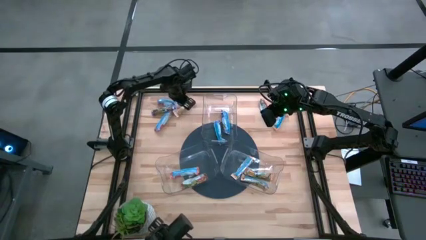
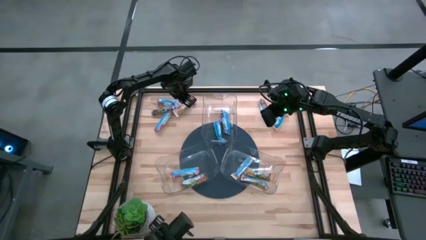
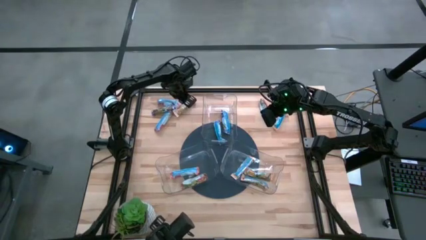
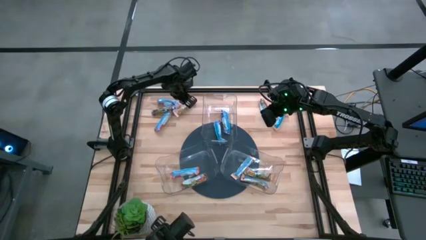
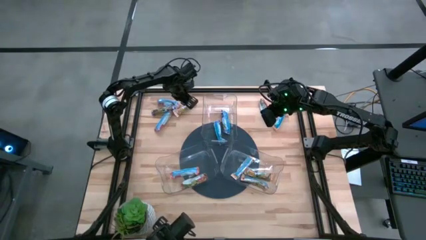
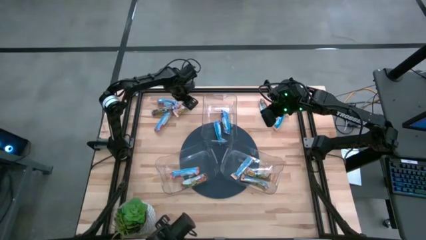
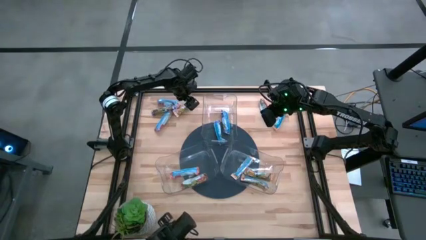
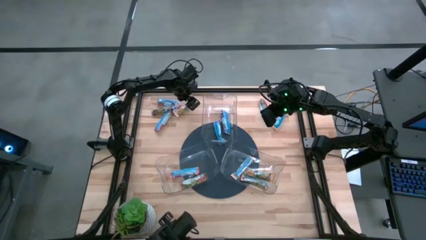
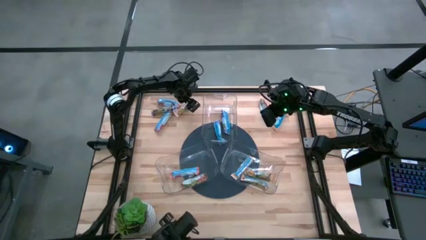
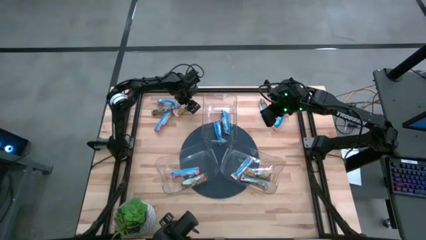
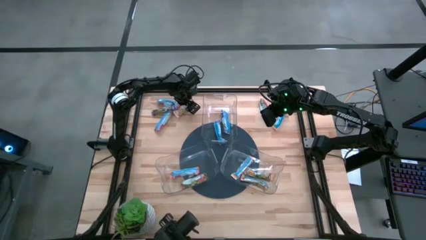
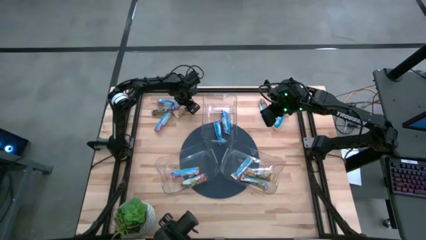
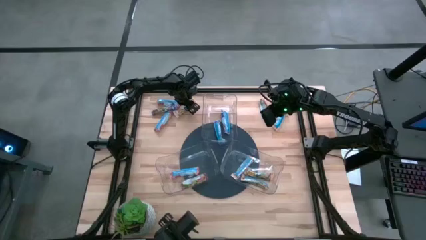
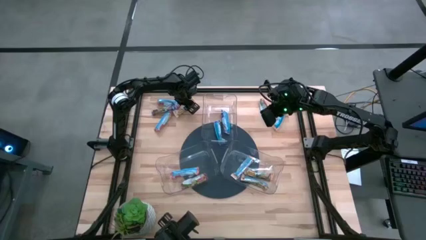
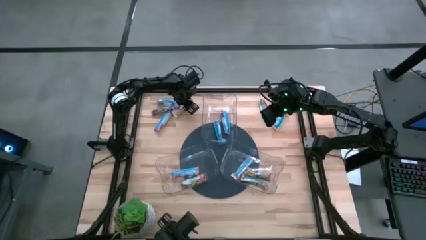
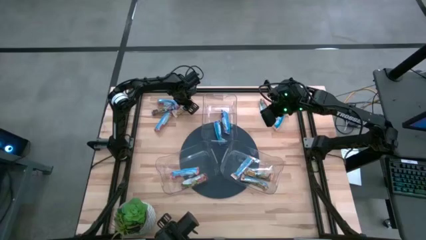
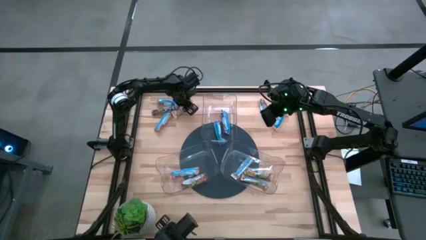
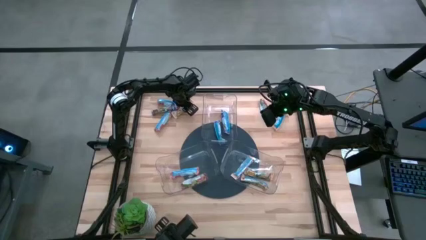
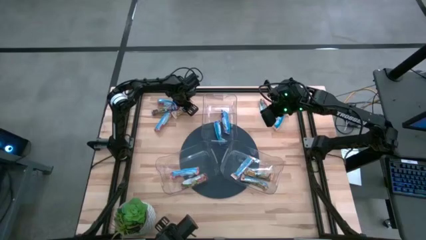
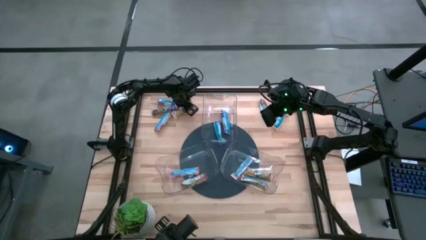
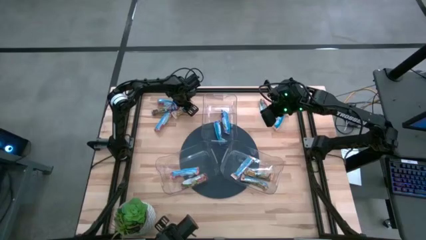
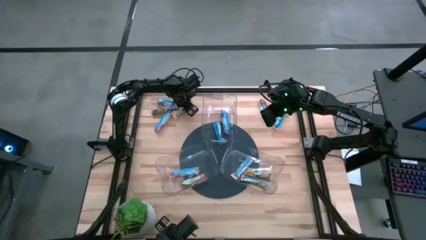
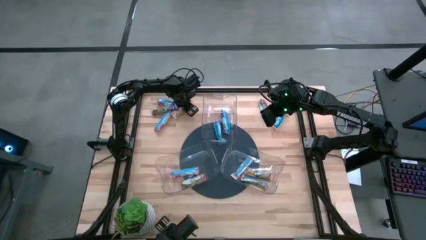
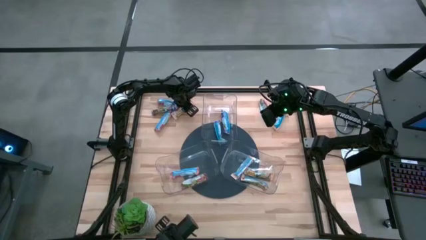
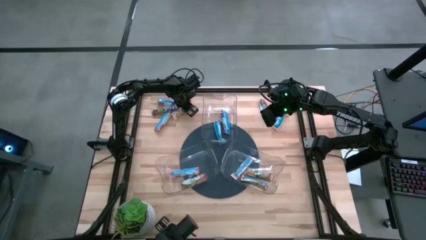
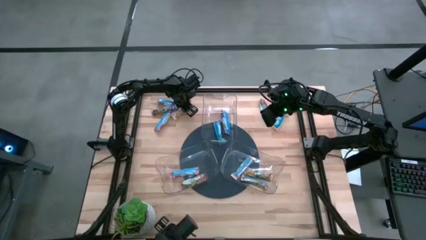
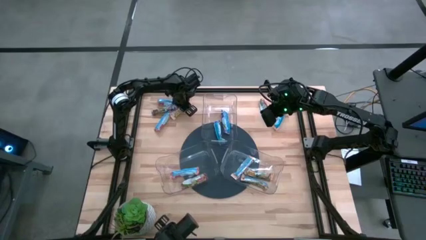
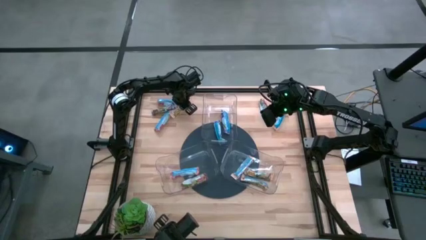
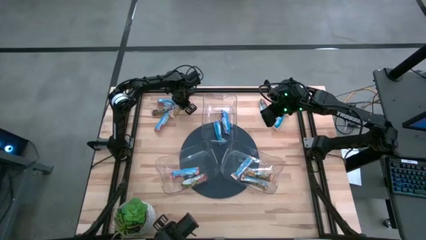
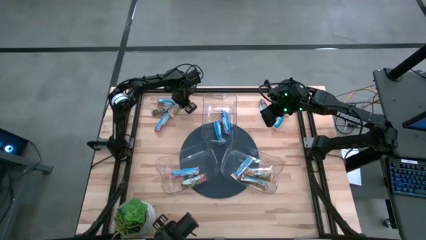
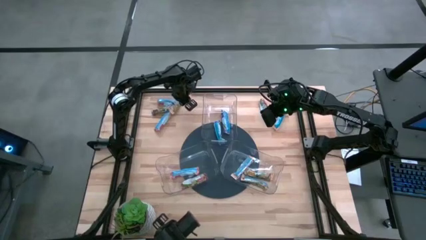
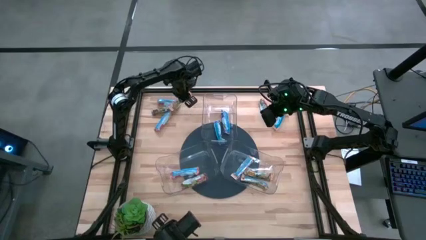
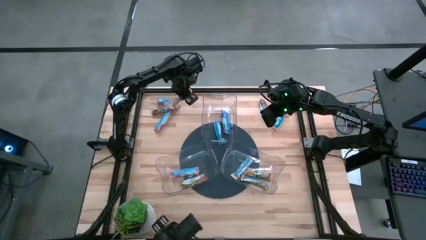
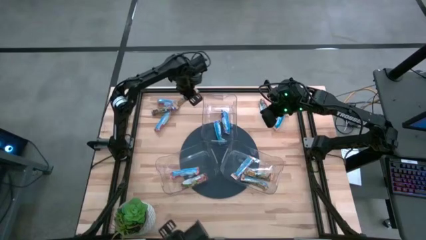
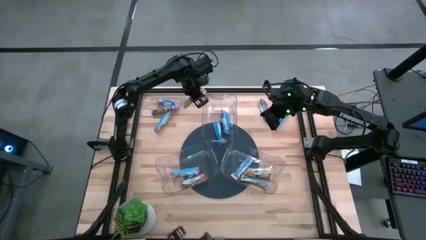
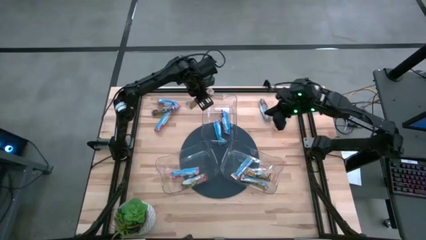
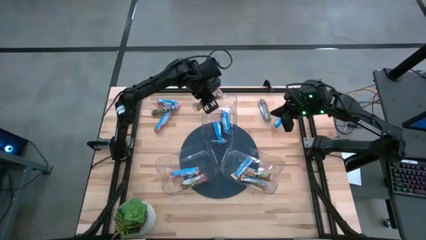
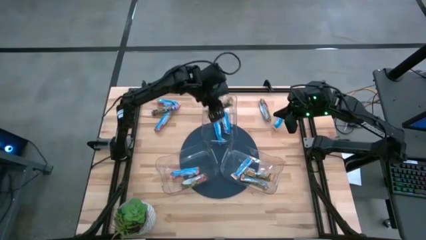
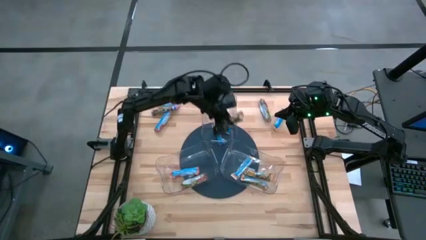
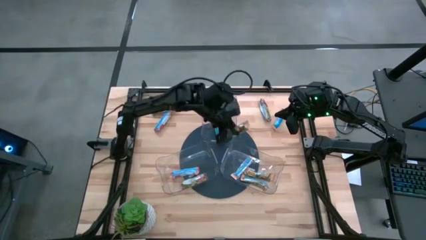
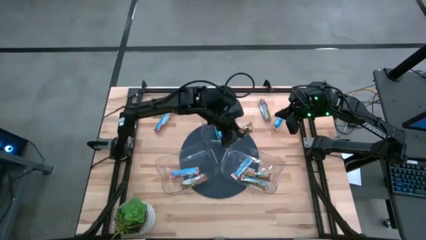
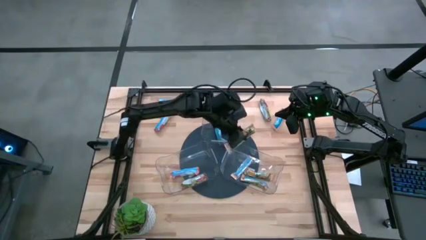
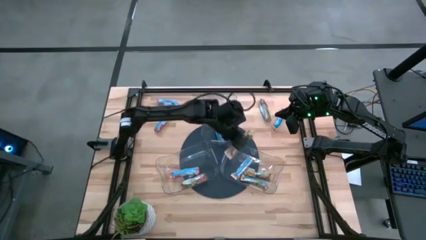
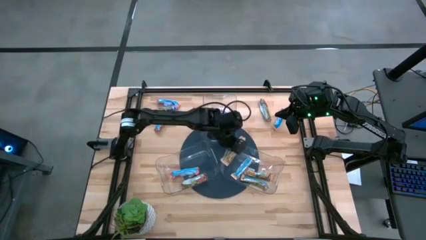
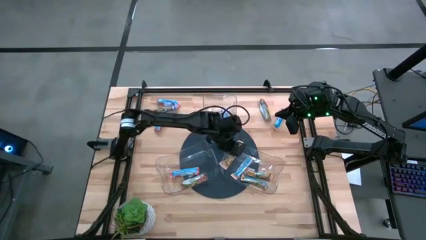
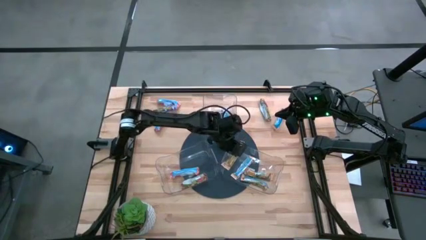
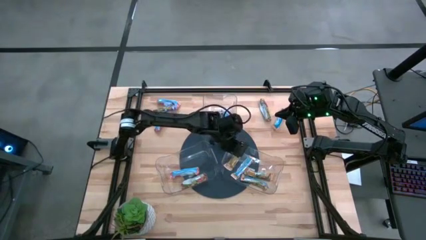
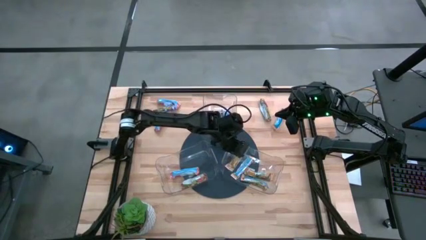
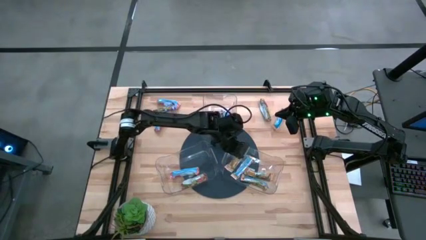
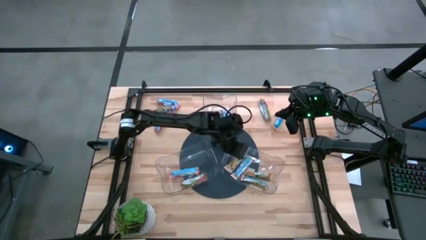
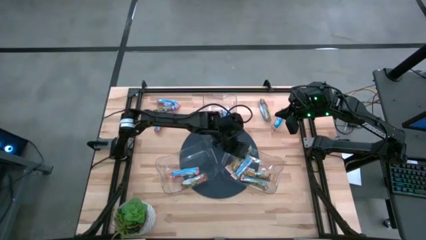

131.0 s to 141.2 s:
Task: Pick and place Granola Bars by type
Put the yellow granola bar into the right transparent bin

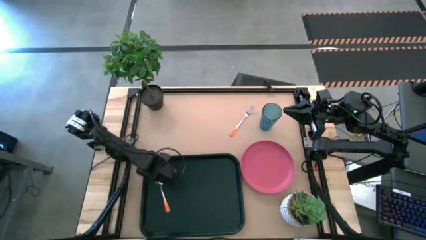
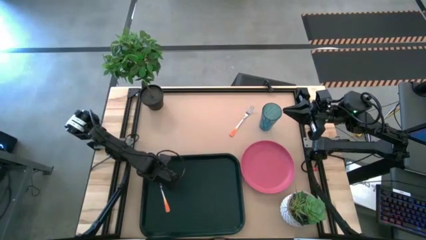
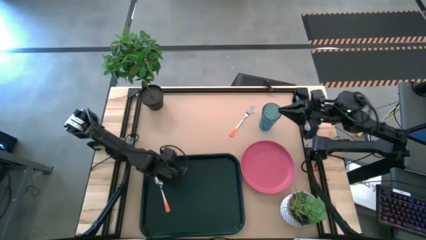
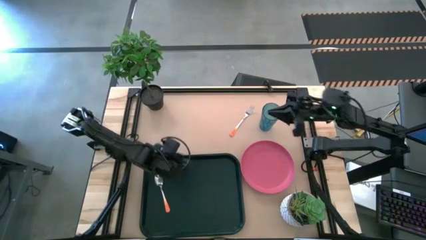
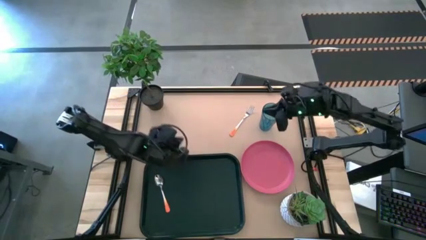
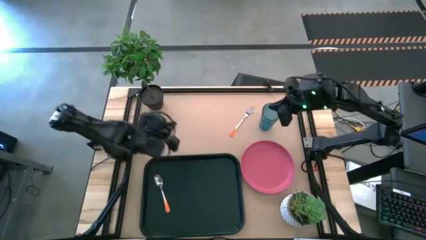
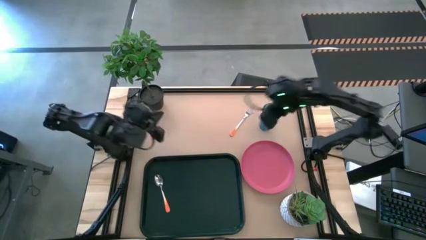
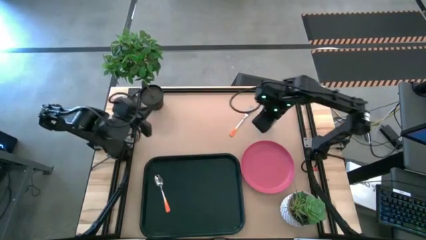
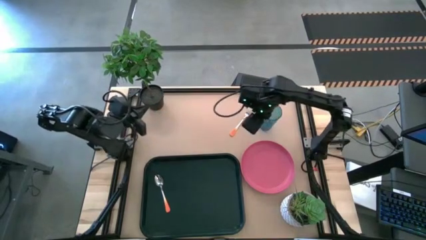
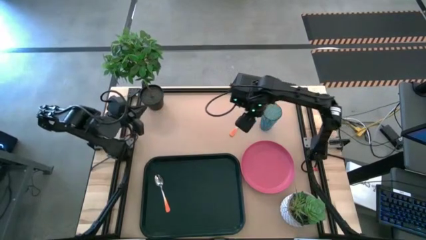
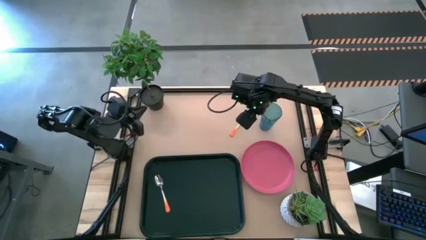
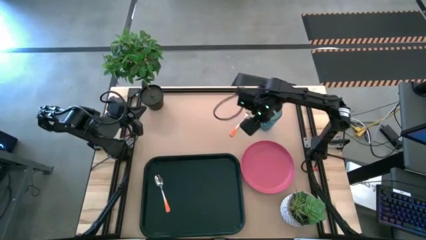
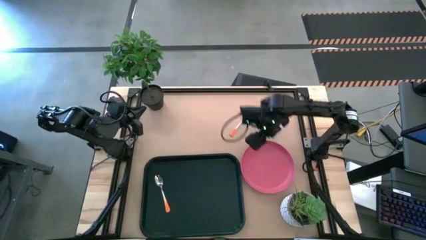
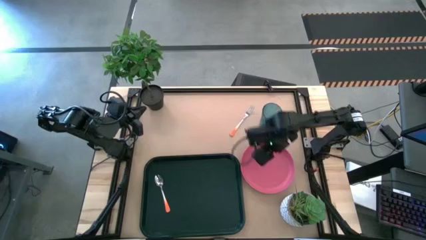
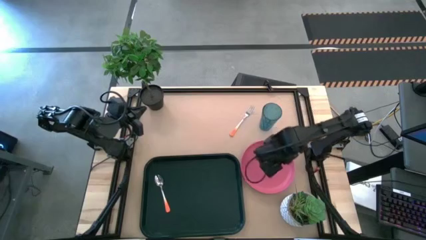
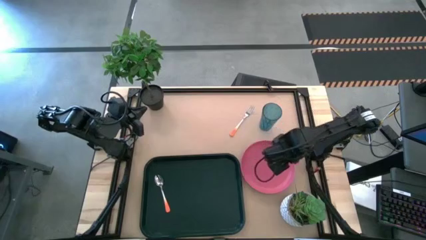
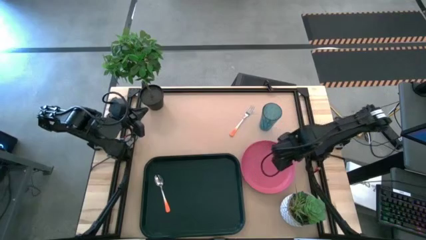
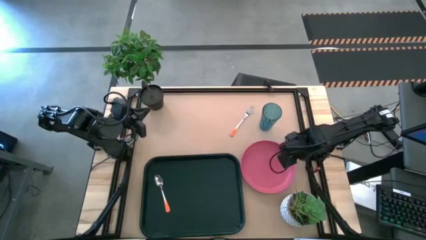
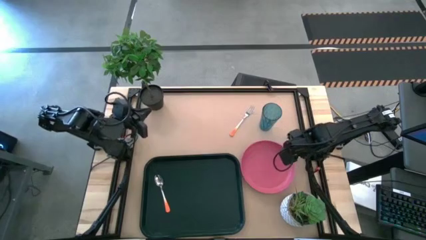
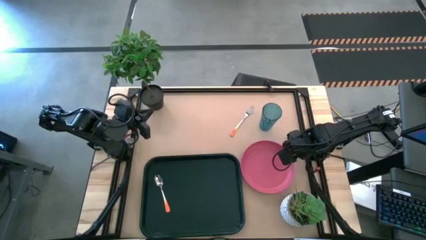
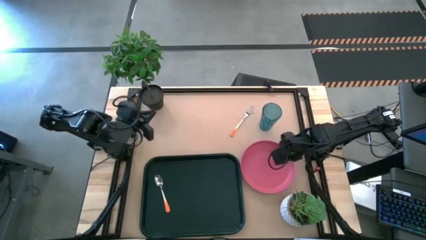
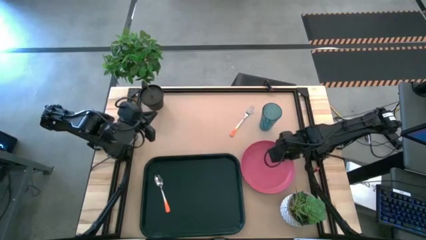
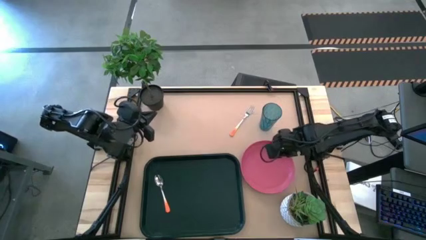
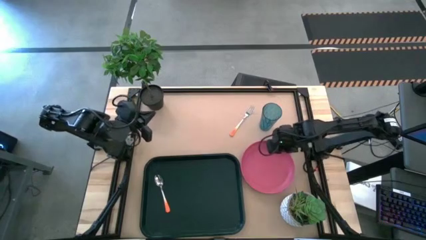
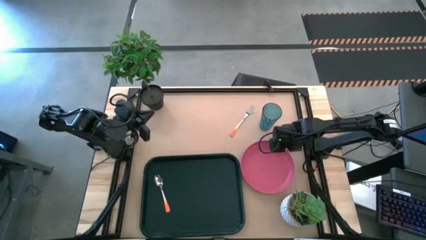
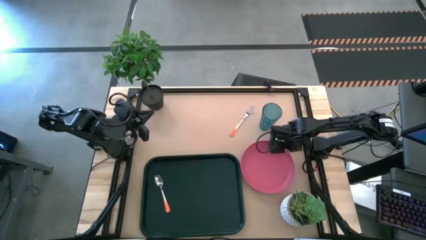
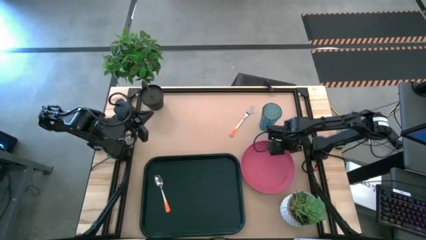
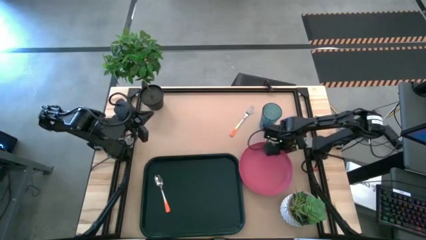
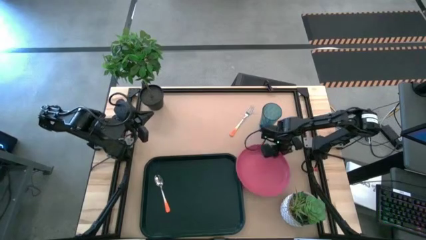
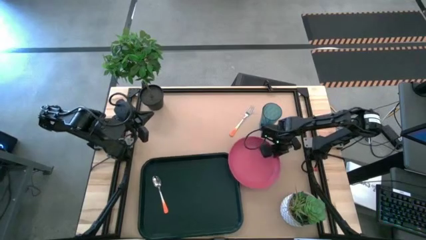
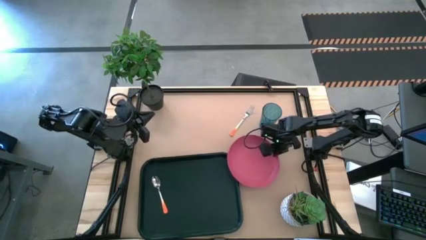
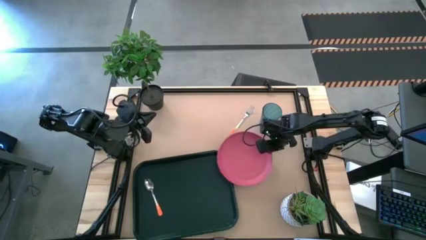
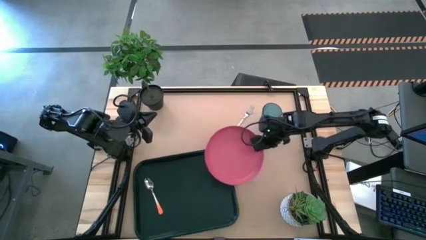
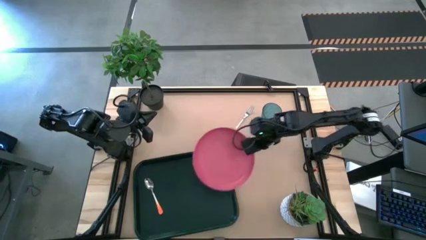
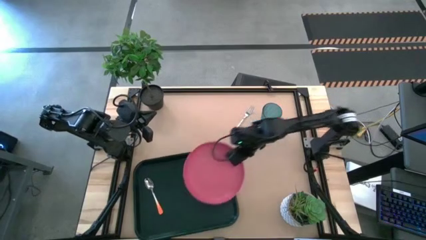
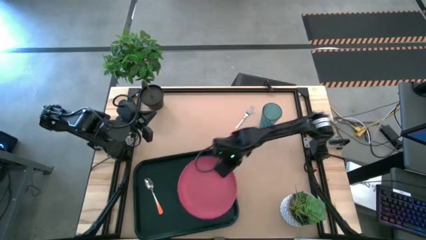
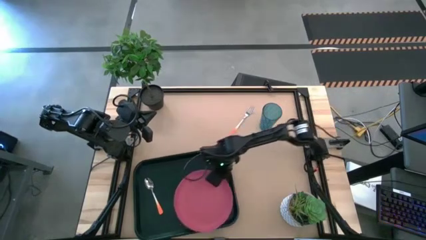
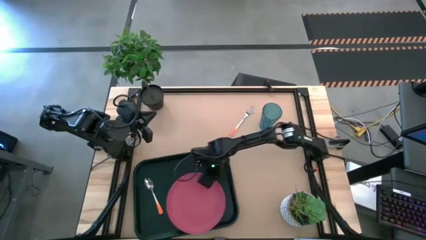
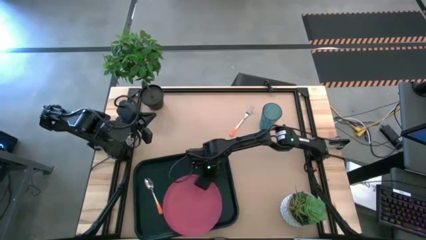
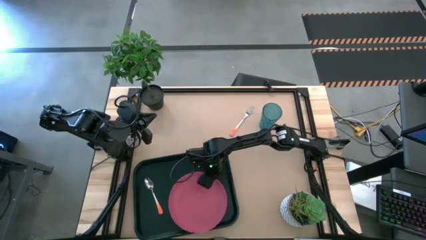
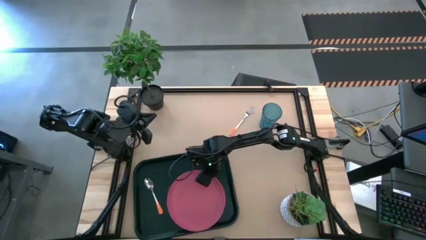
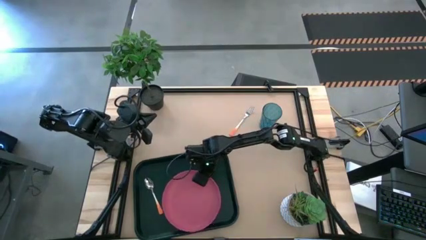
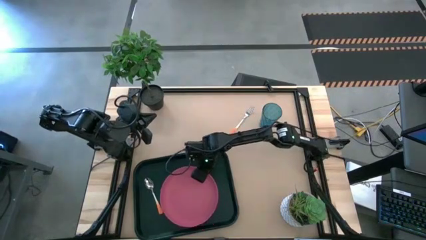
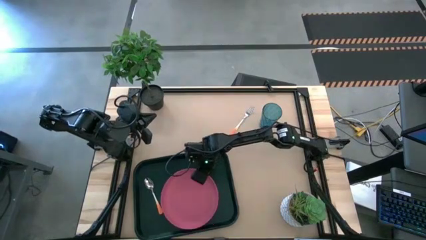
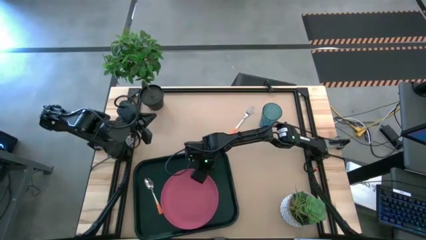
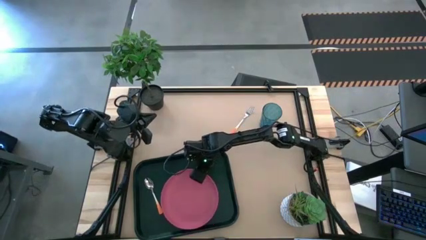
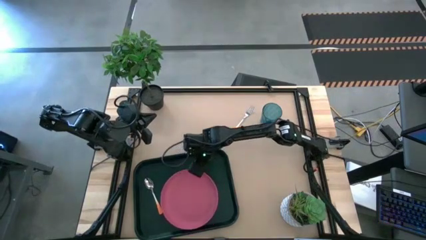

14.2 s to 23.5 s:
Task: Pick and place plate/cup/fork/spoon on tray
Put the pink plate on the black tray
